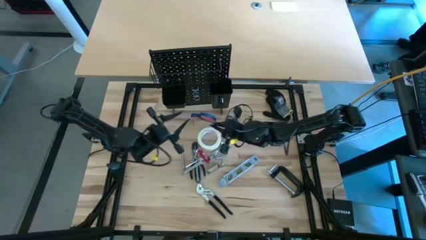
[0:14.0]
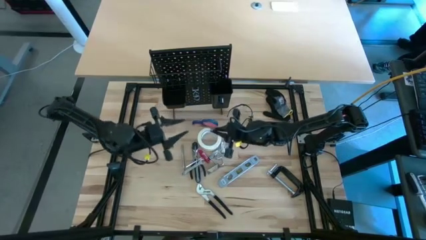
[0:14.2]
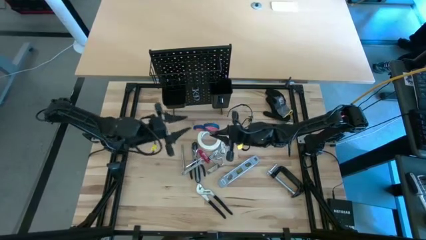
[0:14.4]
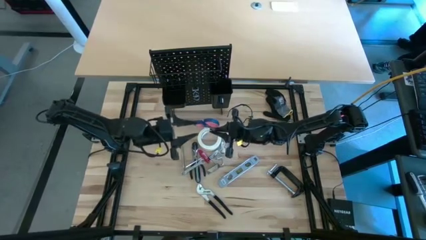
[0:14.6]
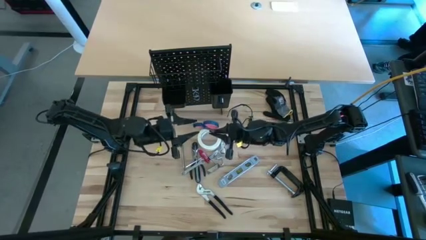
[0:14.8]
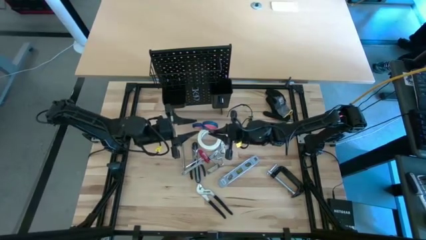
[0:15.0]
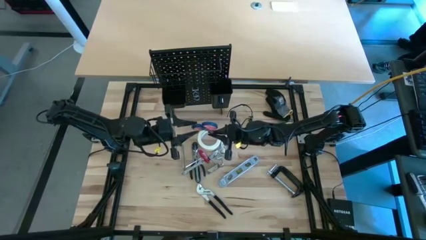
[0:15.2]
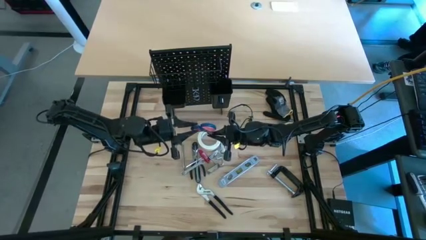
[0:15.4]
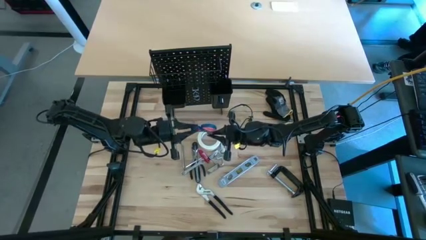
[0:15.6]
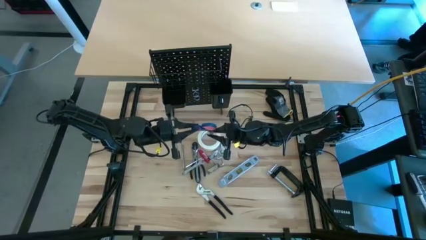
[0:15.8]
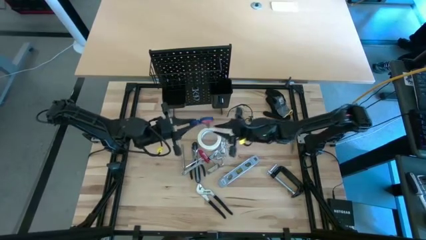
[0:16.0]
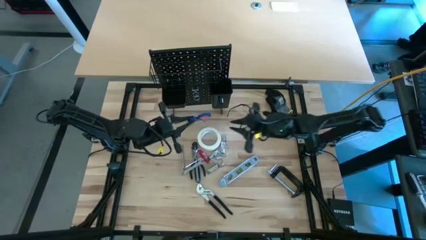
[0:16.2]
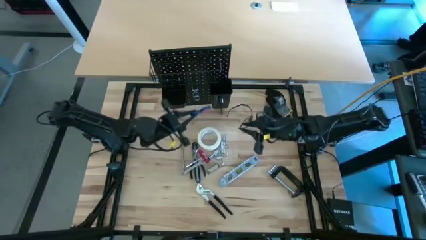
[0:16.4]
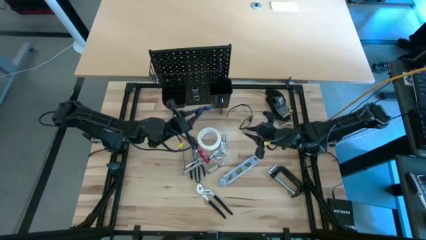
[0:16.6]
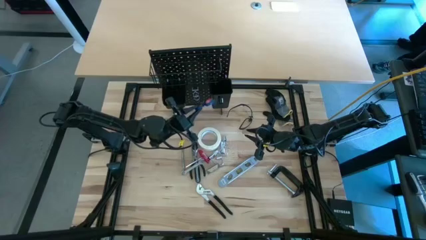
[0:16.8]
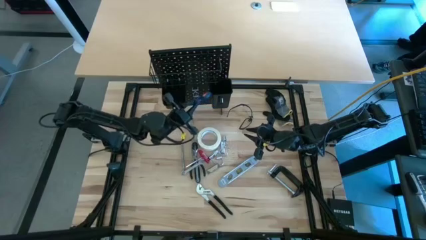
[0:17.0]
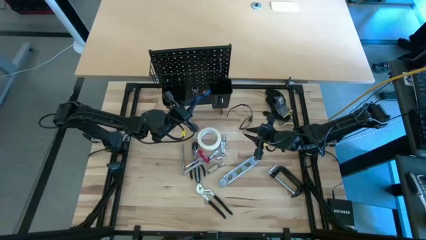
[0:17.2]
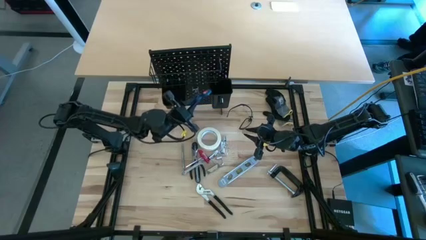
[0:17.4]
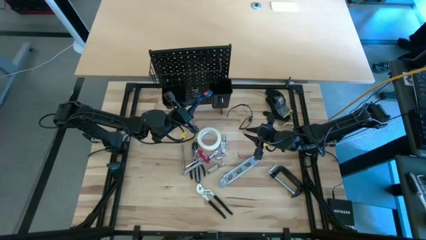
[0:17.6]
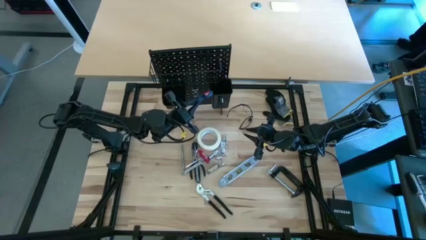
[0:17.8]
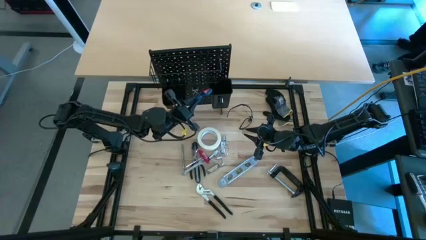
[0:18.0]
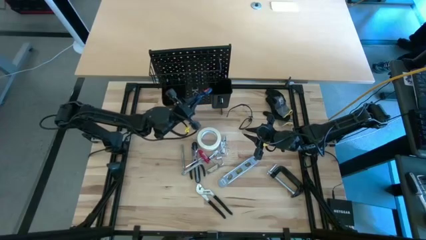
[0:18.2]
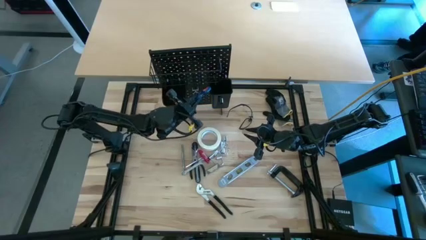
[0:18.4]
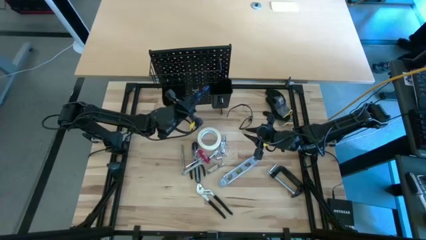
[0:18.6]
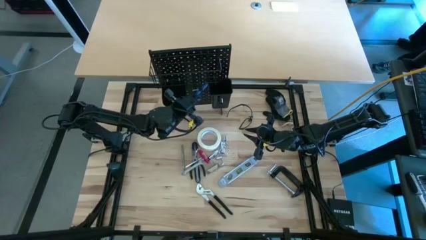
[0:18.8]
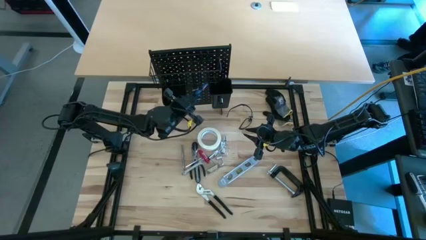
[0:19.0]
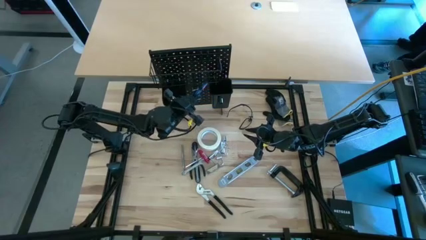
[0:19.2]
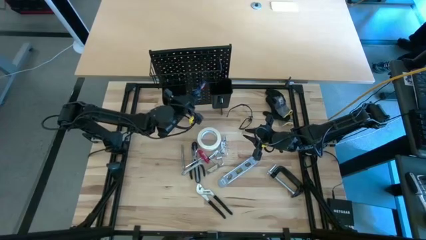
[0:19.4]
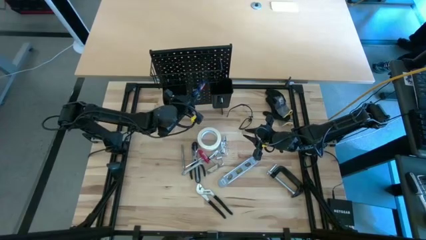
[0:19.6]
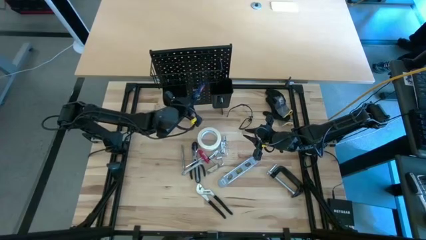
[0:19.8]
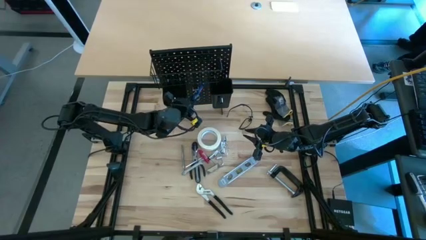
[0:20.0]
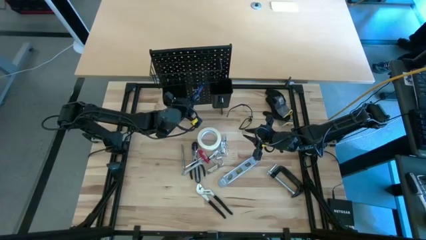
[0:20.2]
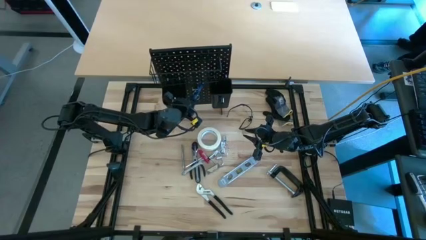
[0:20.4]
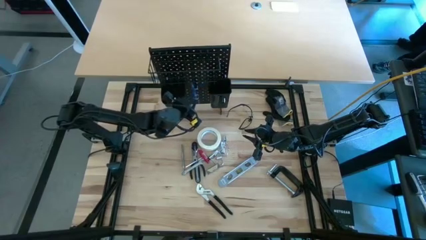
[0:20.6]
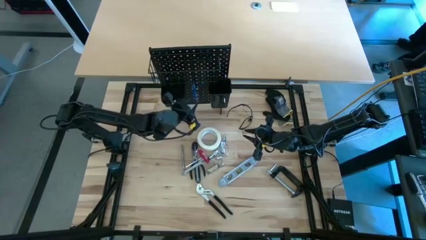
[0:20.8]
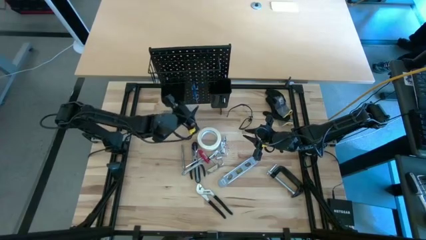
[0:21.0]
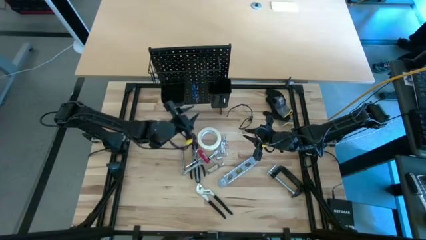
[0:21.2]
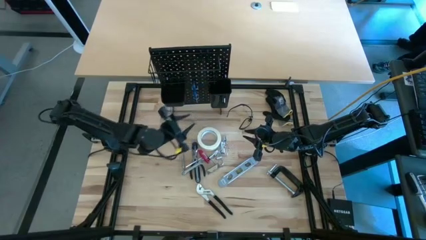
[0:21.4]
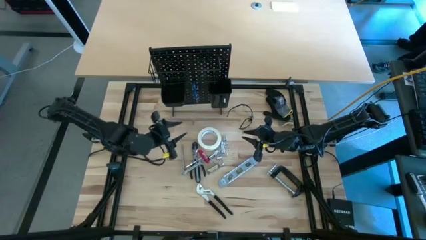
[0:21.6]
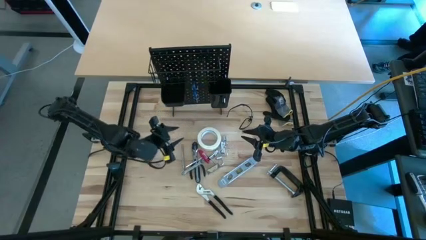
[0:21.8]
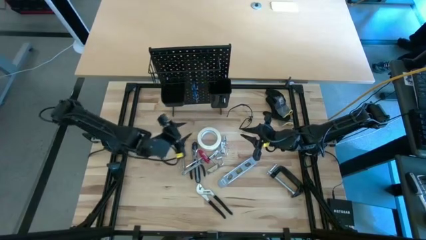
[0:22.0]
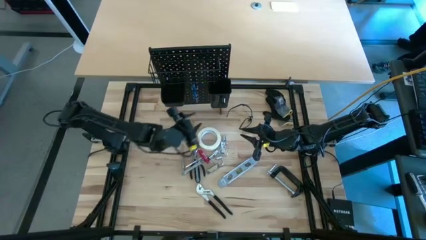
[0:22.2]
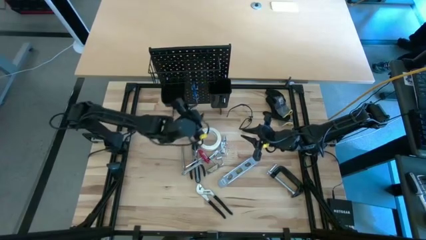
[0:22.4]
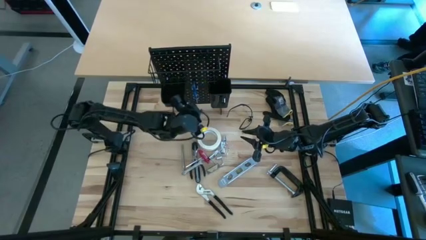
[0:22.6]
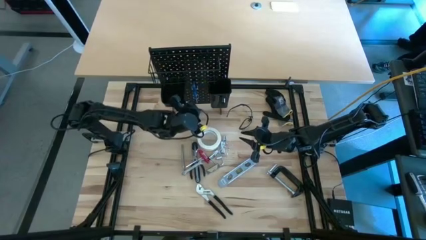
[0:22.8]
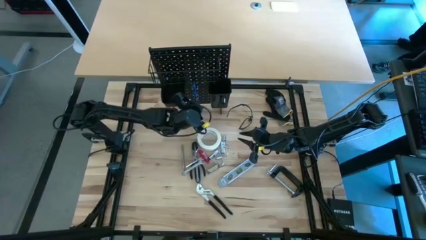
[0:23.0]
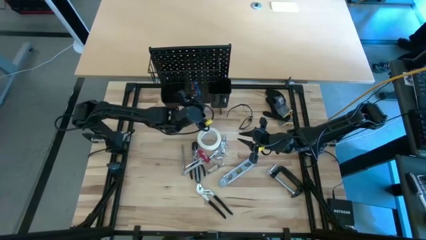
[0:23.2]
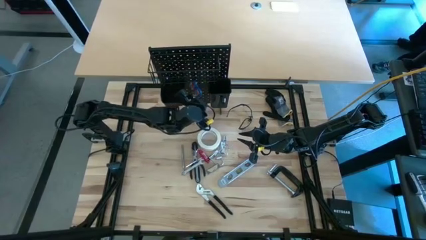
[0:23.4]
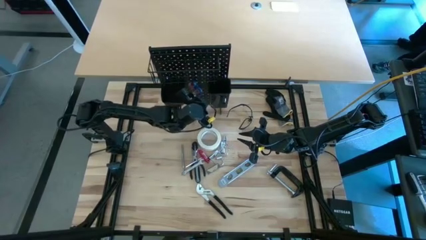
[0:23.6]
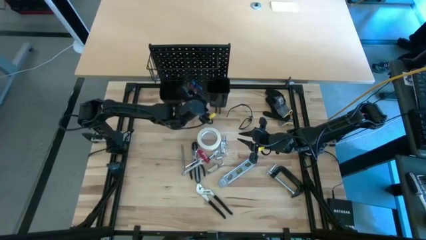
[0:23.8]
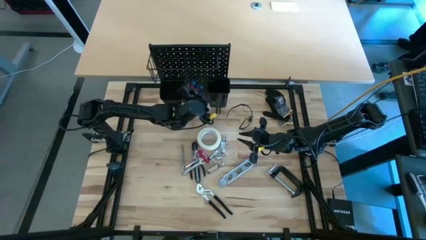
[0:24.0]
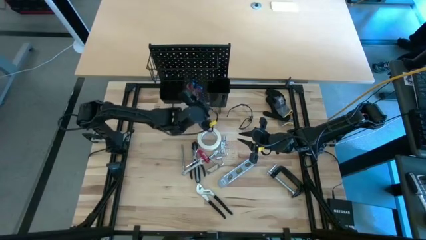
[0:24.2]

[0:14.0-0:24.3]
Task: Hang tools onto peg board
Hang the blue scissors on the peg board

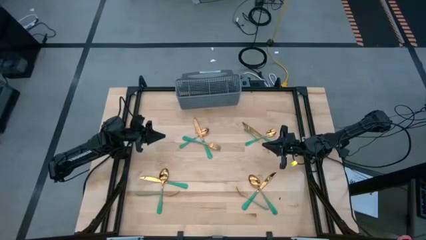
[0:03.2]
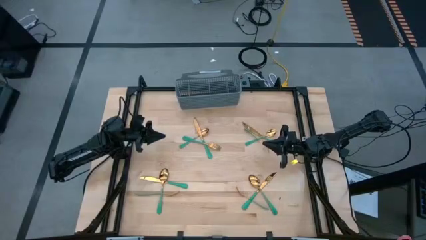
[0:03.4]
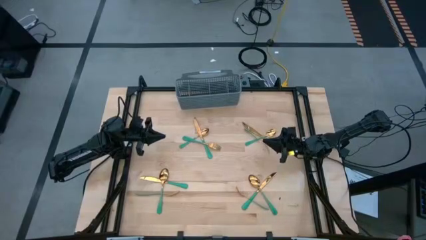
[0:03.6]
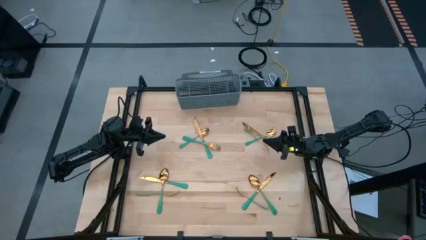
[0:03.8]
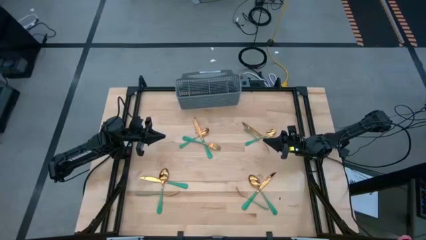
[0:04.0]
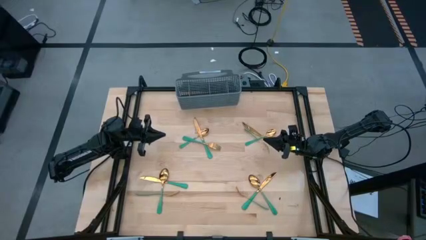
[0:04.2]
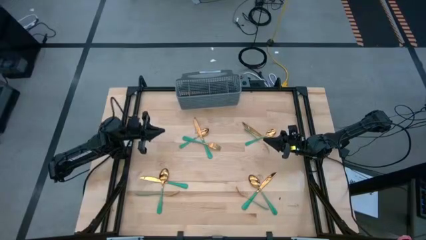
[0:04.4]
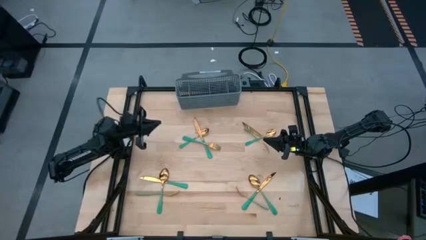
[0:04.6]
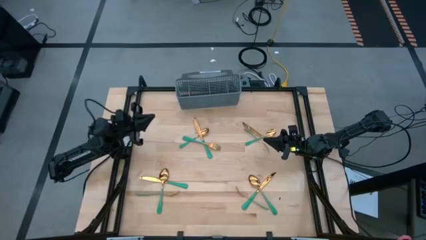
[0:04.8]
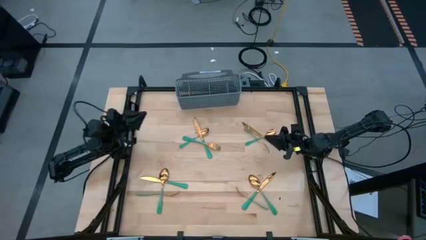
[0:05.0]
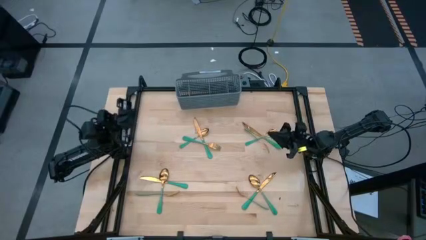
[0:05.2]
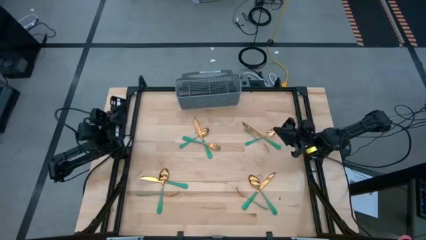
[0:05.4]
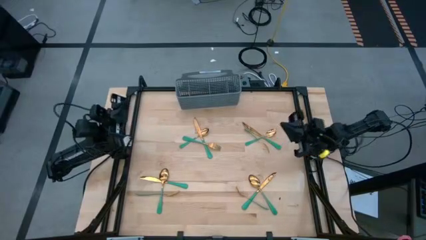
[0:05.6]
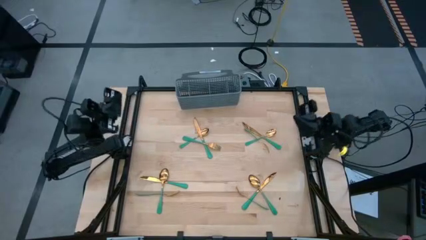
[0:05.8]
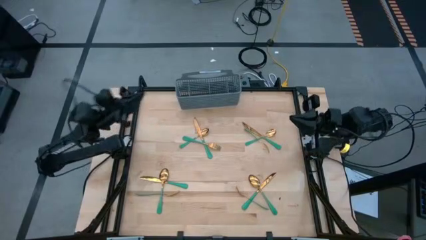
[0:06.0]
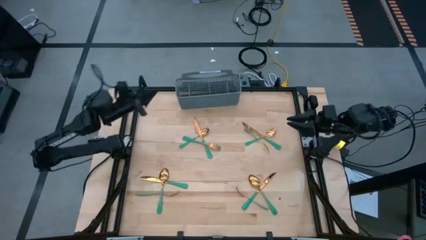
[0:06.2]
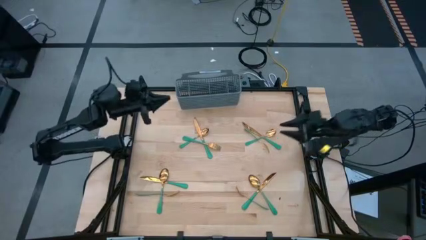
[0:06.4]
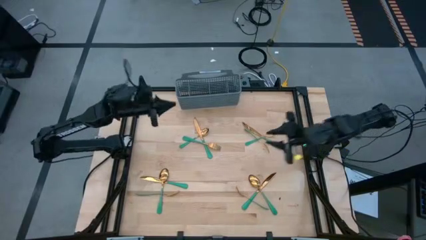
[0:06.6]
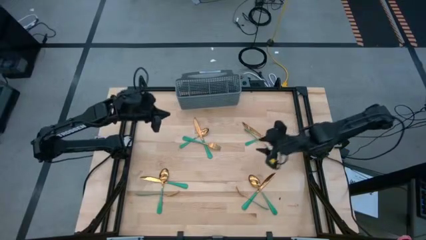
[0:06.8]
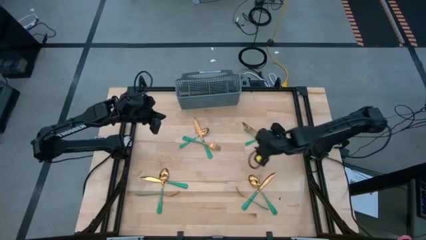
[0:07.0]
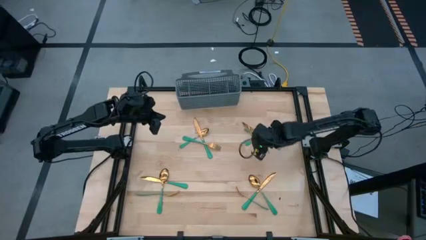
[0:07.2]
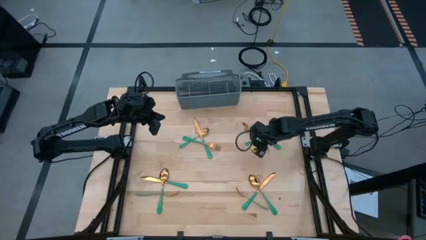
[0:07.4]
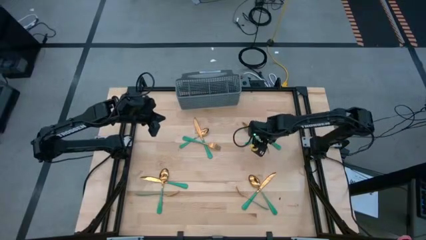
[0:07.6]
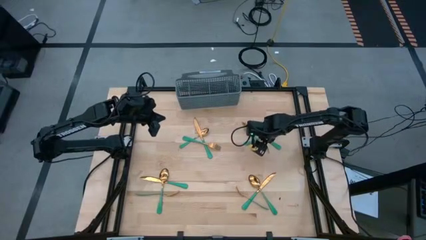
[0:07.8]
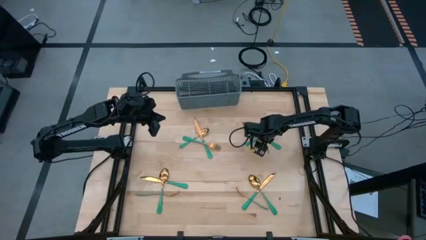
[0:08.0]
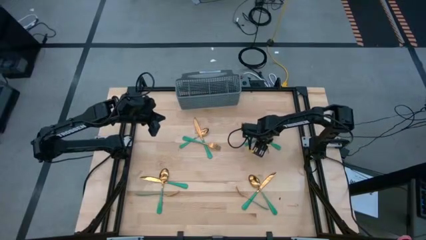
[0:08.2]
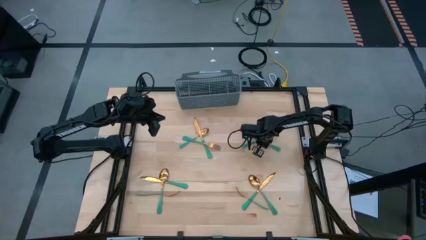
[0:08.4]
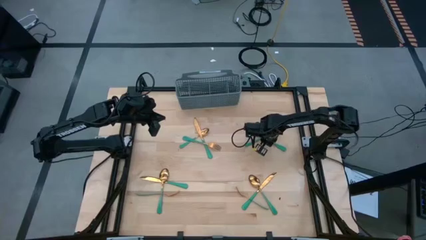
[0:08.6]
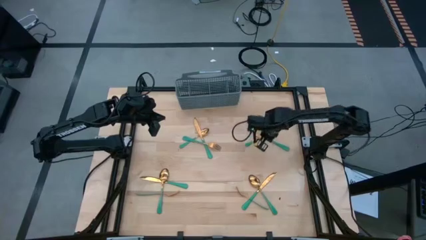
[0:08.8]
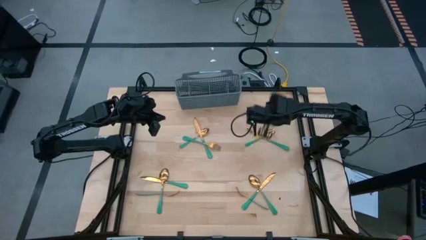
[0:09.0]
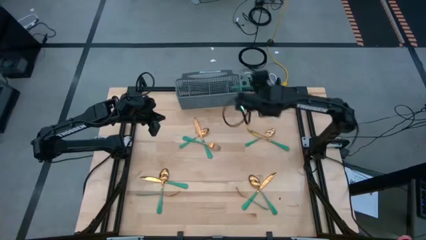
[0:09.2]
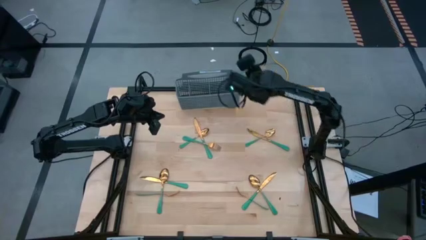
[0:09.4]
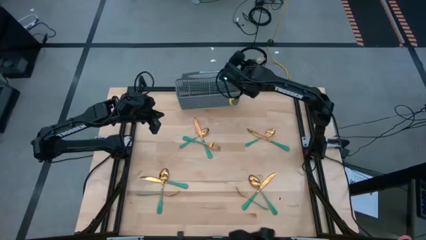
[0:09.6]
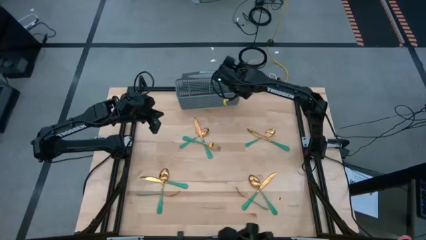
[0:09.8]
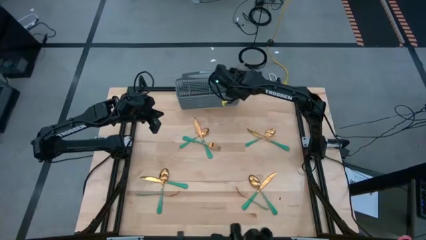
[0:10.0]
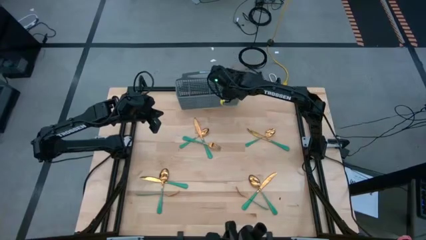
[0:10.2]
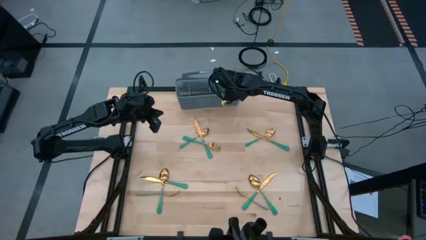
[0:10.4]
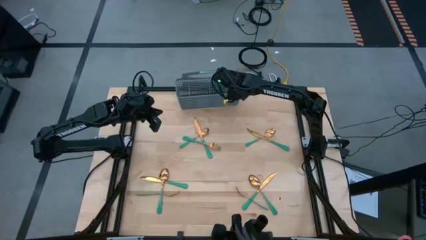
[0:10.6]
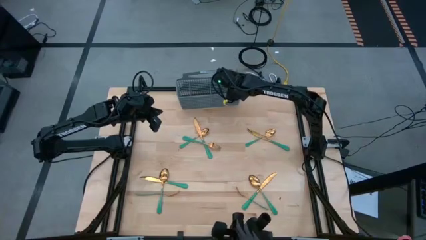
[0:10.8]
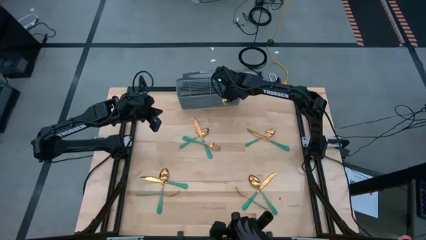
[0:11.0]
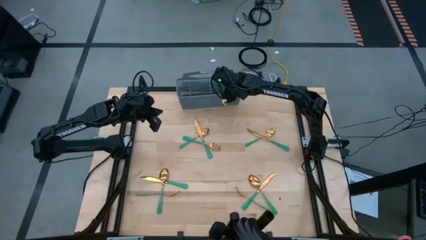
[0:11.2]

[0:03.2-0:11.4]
Task: Sort silverware
Put the green fork into the gray bin
